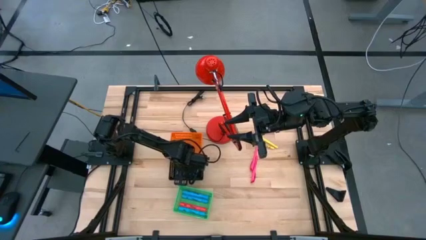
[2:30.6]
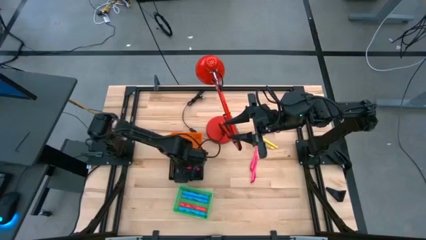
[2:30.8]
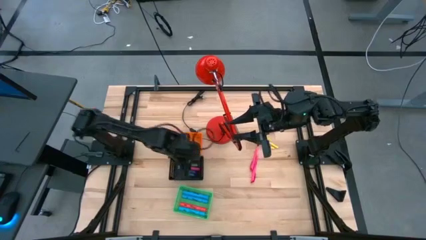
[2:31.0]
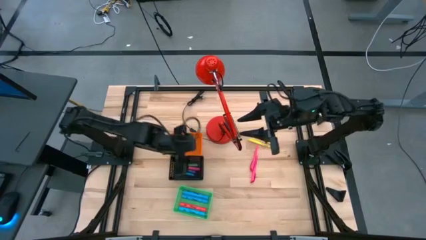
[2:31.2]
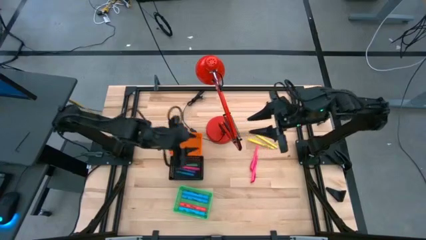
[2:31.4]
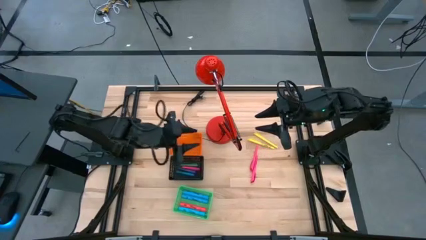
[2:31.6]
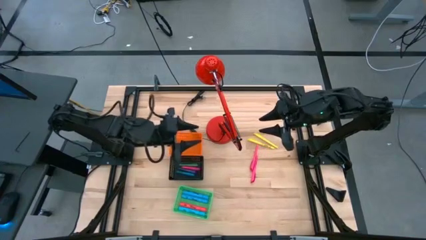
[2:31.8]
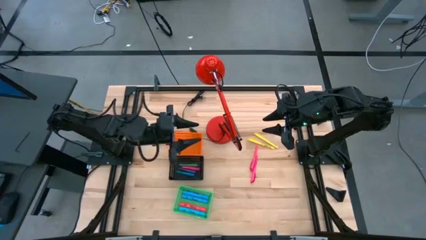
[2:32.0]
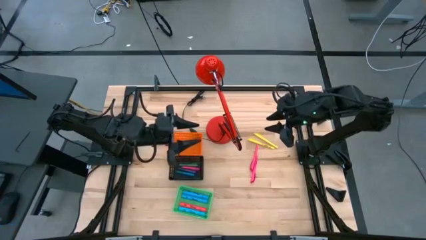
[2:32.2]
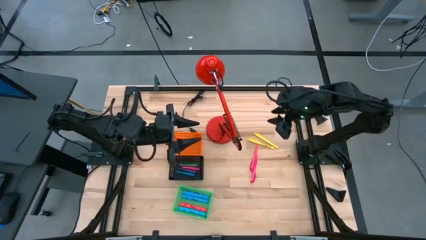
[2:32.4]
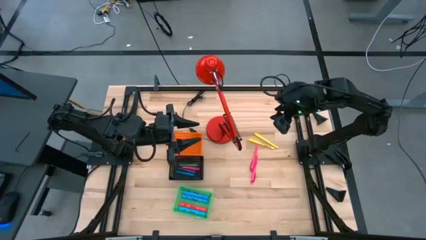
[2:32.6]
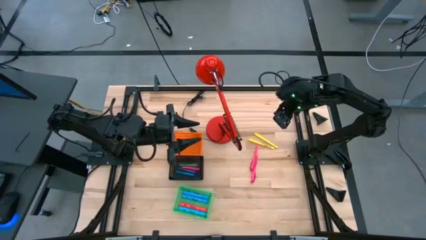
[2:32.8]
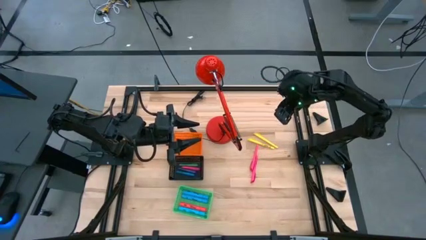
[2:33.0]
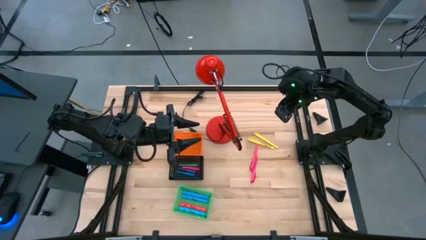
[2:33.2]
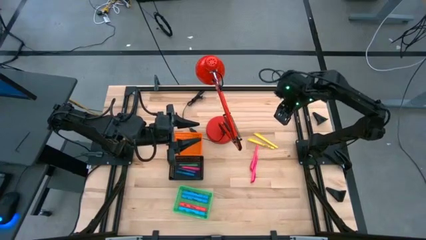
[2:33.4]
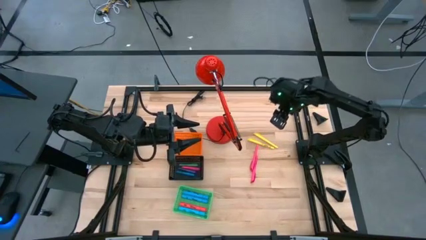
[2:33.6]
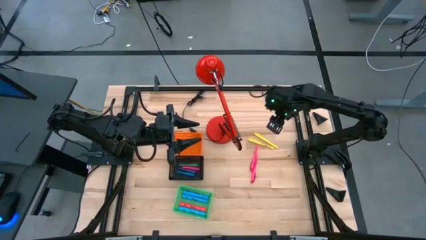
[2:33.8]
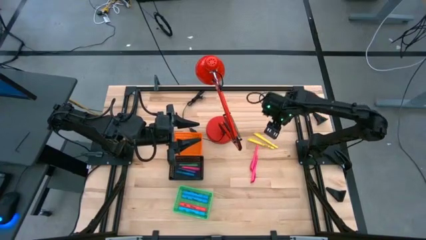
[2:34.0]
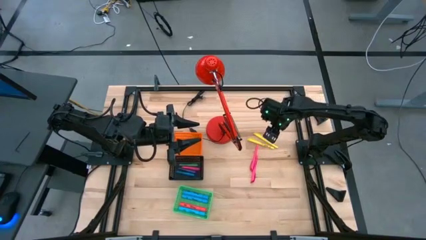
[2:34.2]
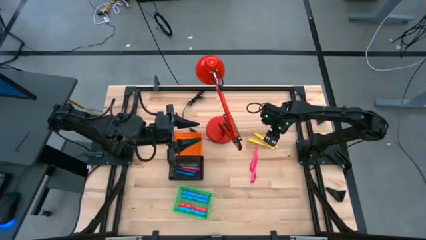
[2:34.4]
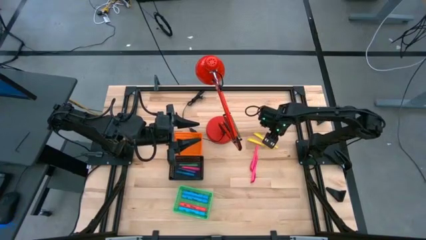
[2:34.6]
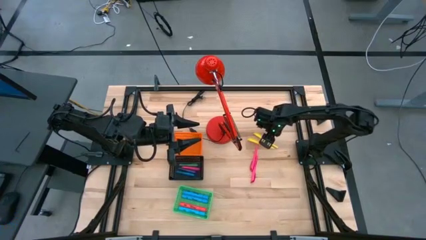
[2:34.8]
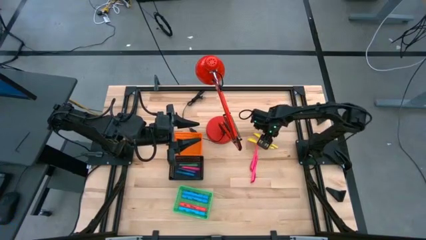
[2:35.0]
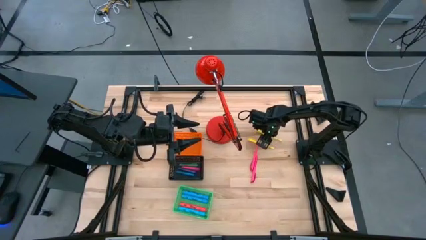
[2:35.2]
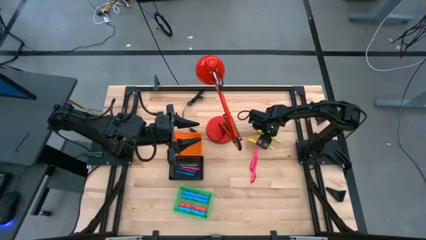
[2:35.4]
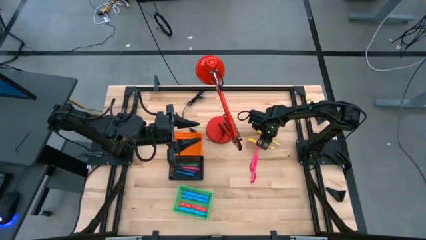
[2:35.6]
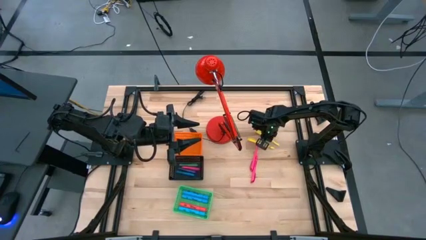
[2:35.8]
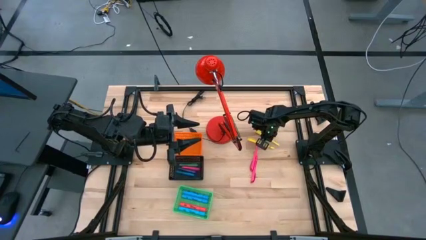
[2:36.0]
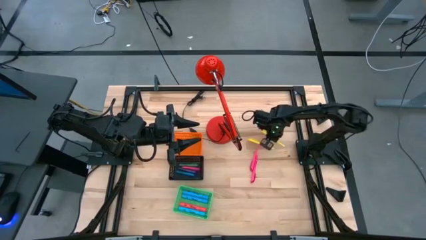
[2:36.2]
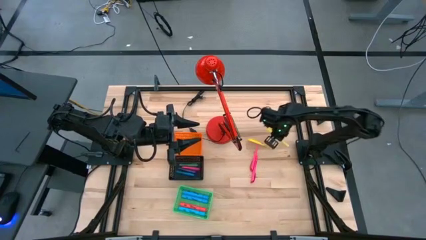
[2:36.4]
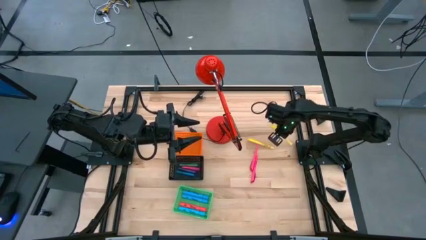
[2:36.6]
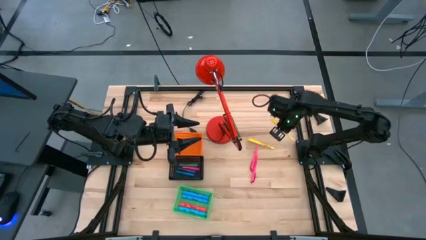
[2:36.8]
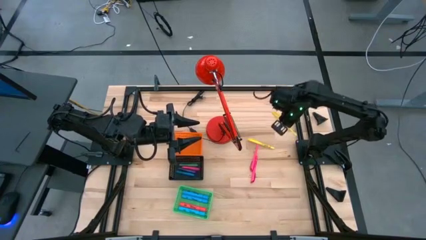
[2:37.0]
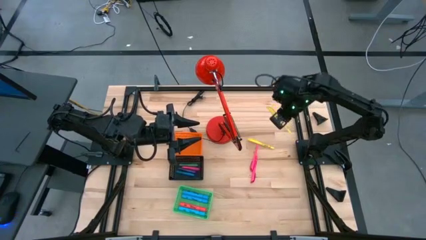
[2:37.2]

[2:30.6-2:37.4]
Task: Pick & Place Markers
Put the top yellow pen into the orange bin

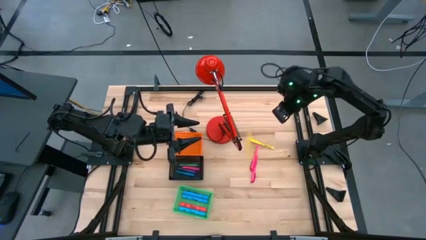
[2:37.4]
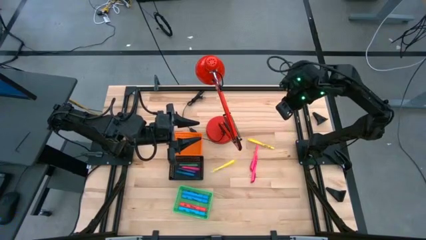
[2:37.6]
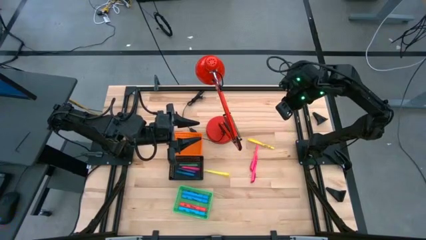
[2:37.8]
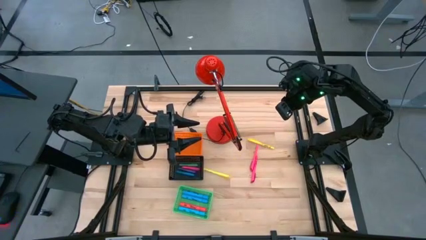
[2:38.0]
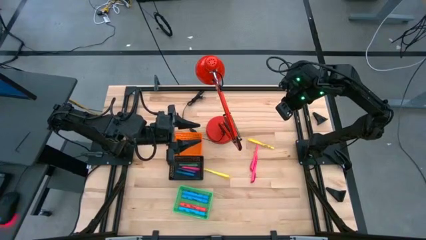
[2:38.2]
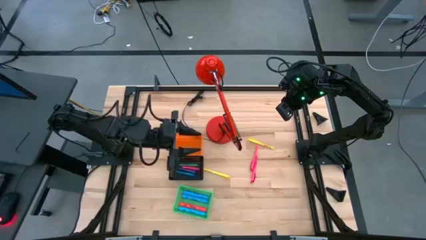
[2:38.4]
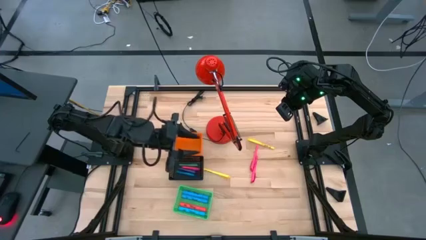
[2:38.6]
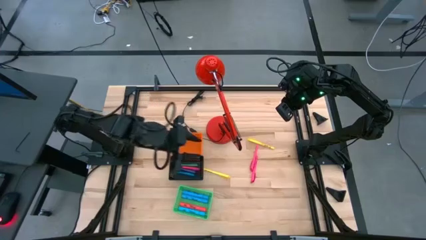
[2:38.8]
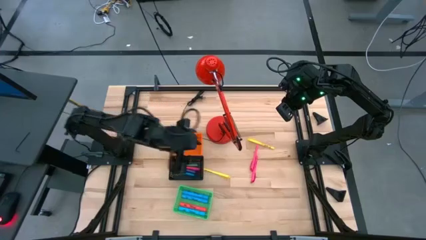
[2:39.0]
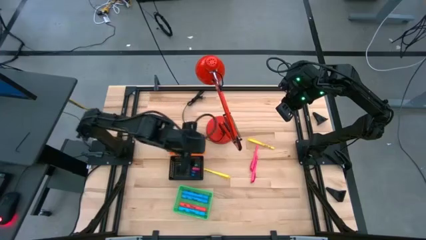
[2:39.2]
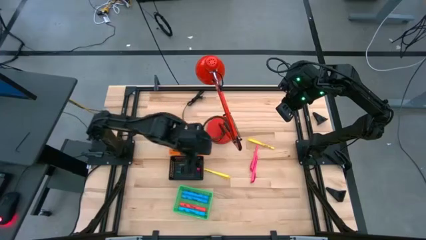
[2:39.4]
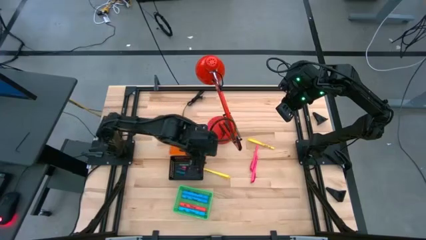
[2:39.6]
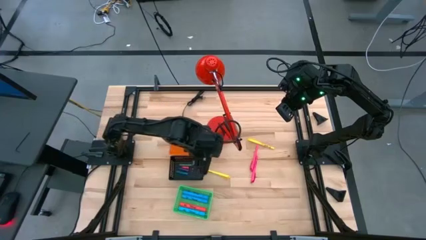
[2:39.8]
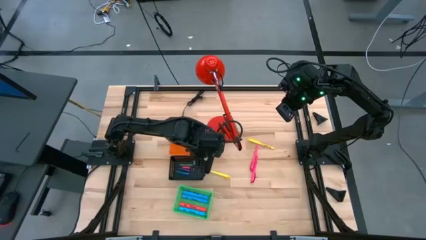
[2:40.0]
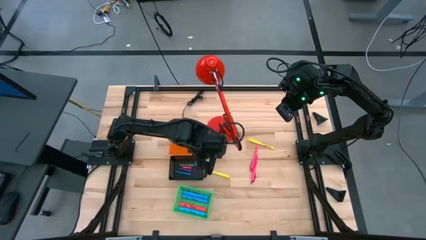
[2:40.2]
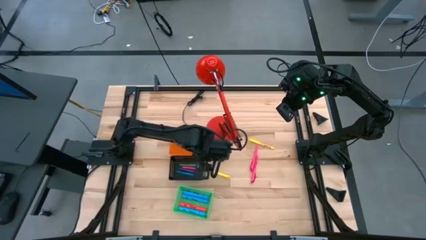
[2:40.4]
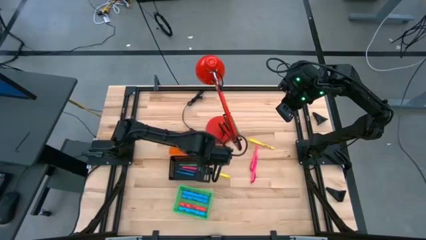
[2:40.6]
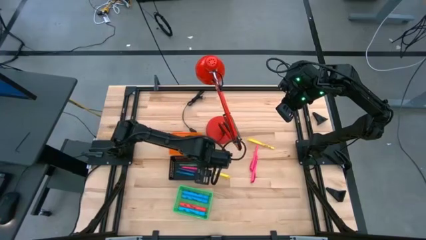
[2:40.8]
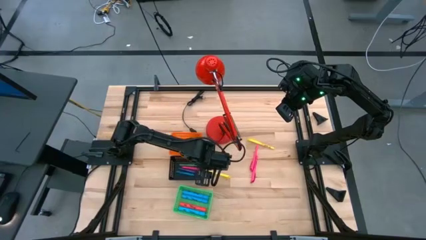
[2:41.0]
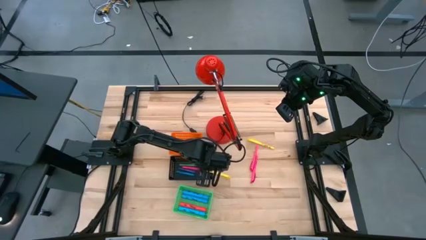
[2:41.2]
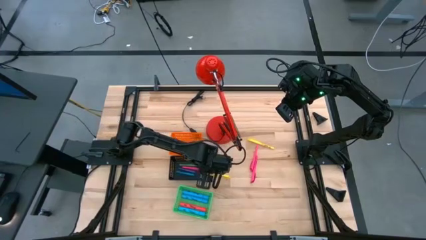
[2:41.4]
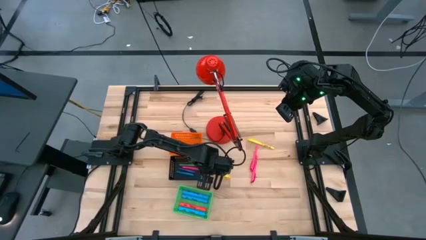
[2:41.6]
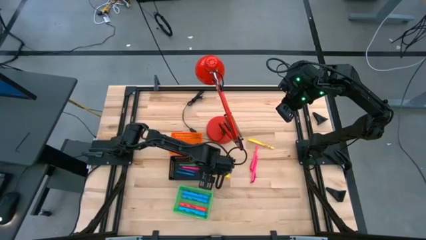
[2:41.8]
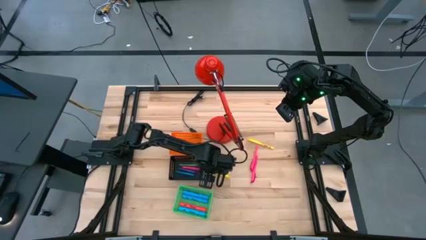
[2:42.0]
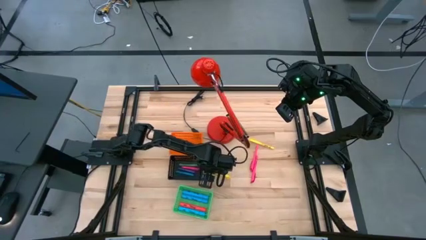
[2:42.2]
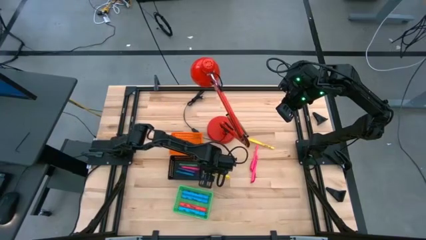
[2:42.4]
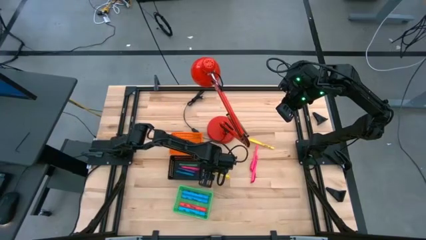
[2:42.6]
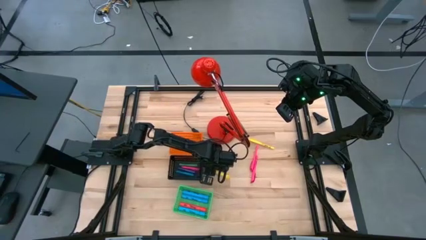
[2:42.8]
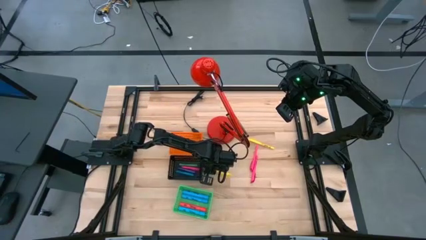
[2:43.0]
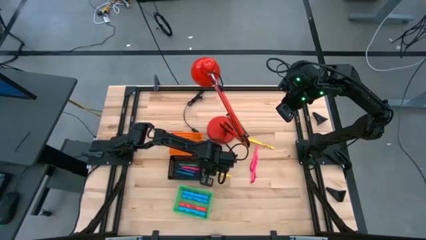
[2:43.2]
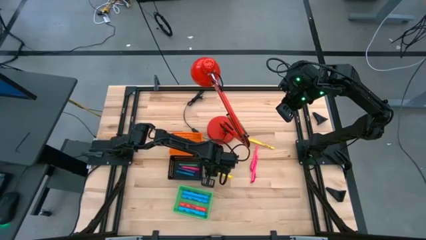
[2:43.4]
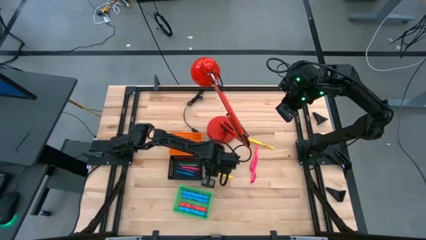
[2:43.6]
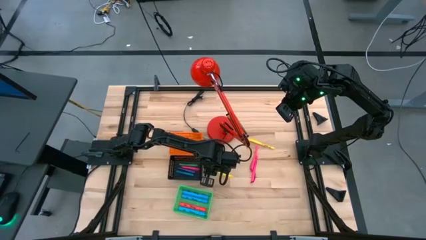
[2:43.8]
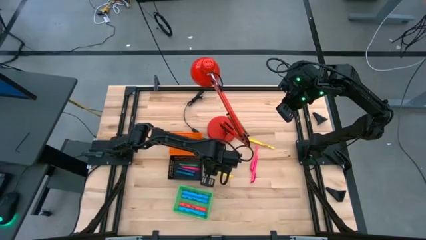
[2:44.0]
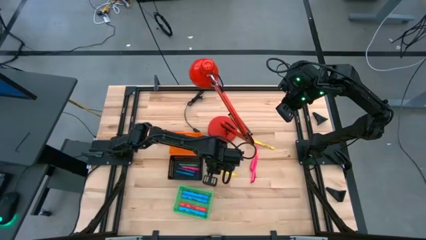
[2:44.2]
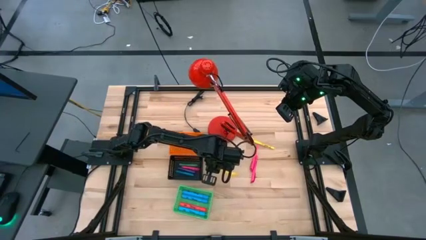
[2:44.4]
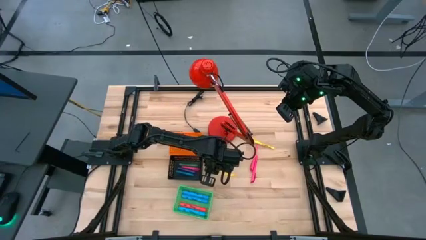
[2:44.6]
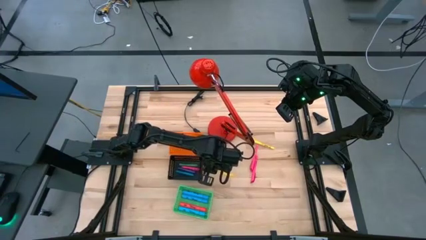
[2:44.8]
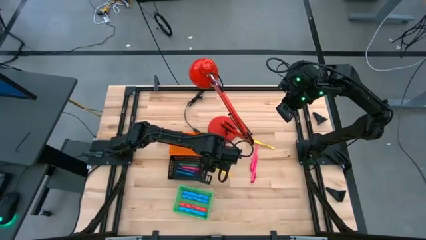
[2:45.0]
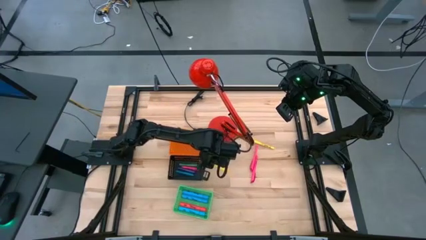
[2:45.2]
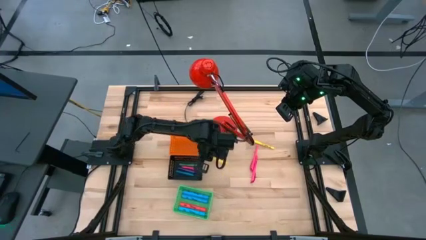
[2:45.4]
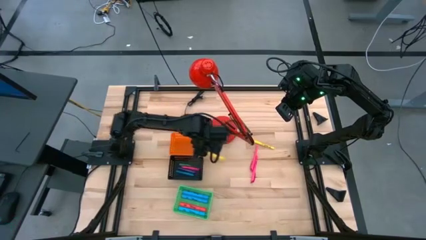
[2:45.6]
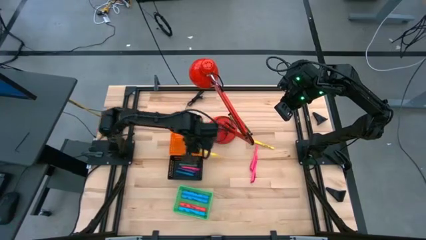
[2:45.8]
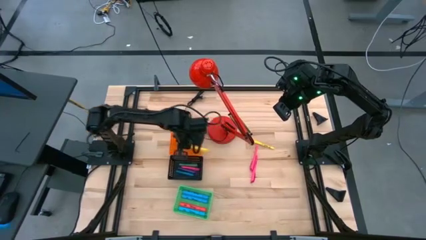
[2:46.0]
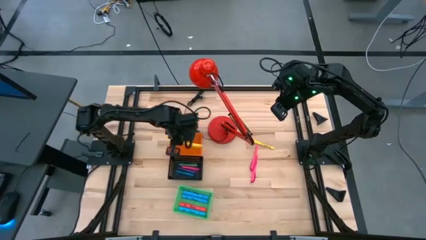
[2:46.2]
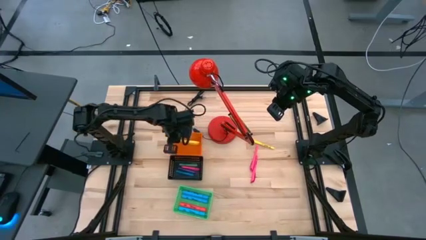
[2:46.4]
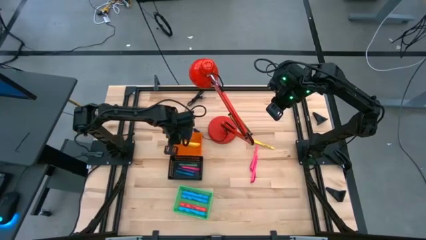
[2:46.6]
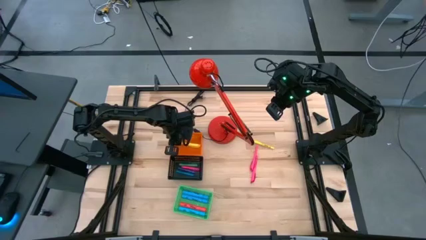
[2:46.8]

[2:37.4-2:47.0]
Put the top yellow pen into the orange bin
